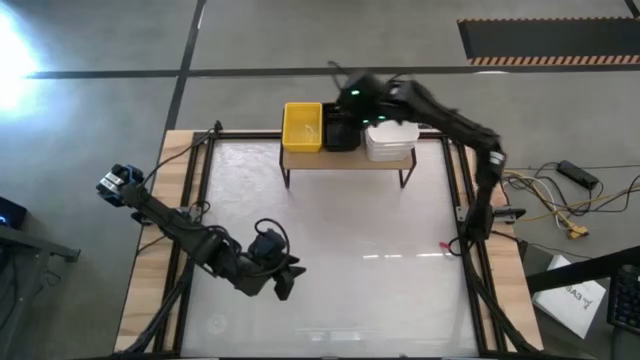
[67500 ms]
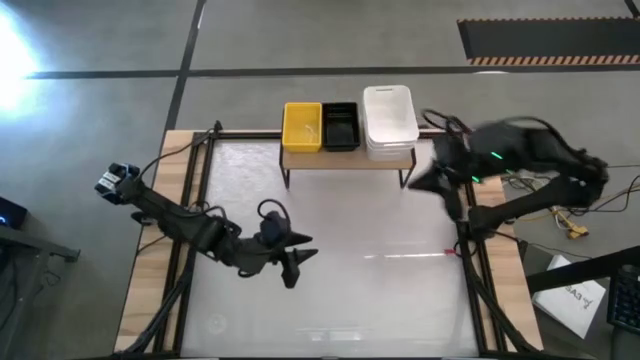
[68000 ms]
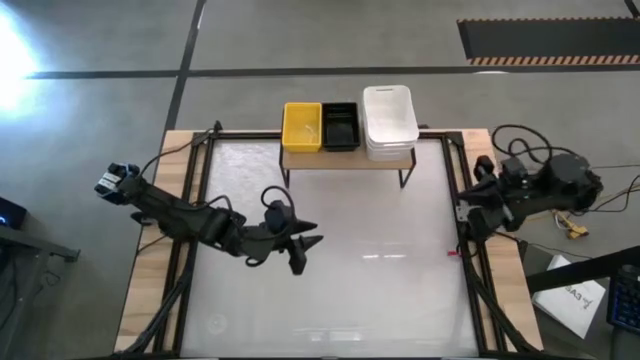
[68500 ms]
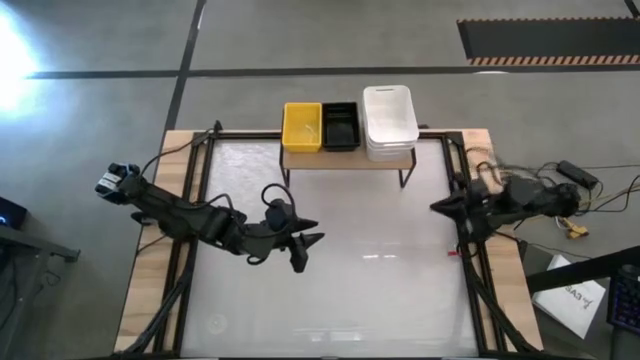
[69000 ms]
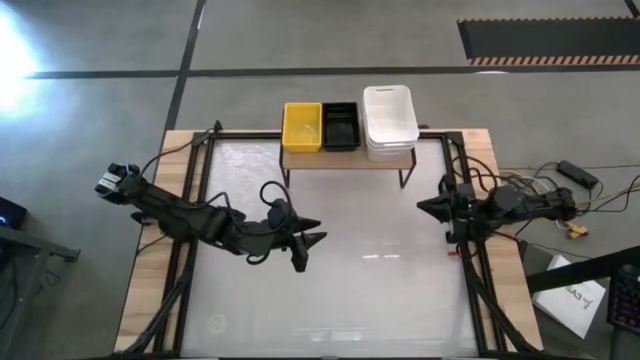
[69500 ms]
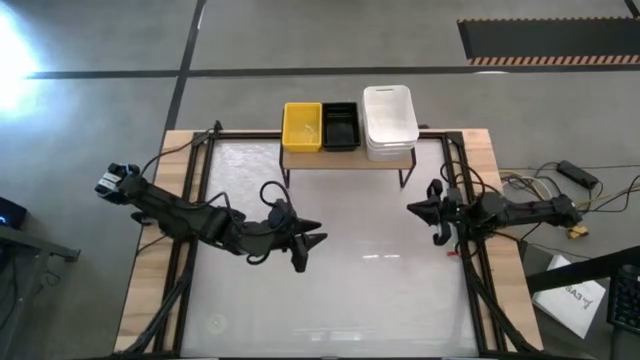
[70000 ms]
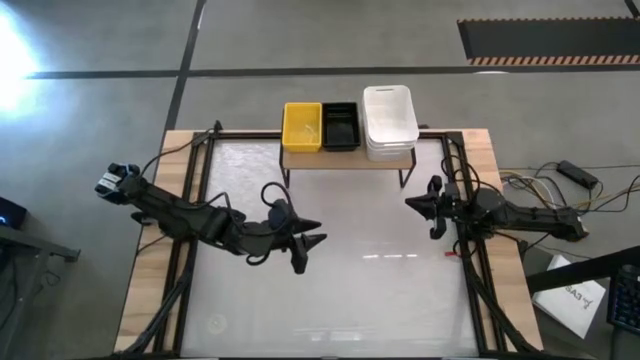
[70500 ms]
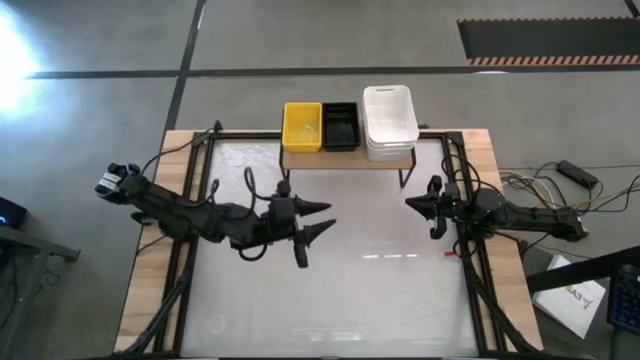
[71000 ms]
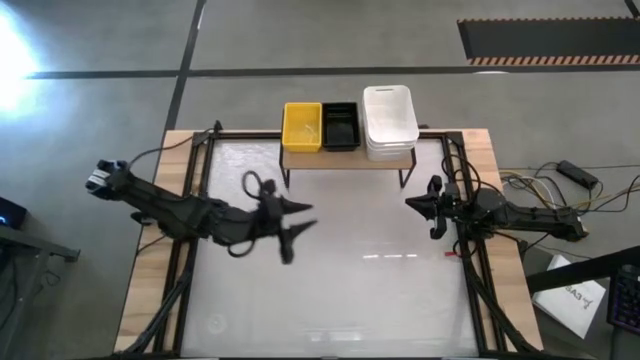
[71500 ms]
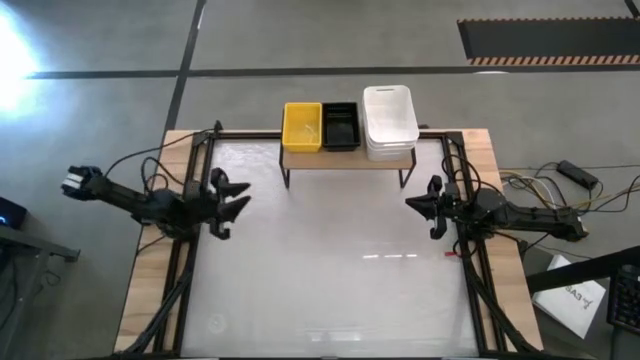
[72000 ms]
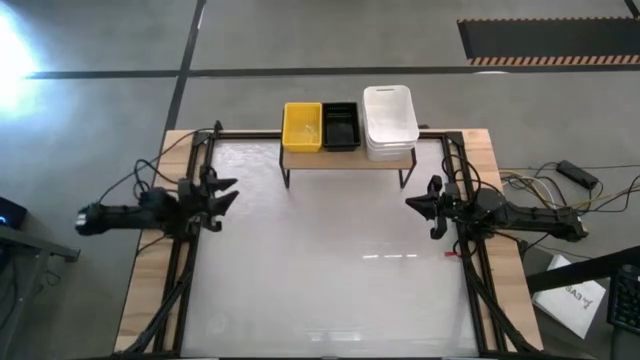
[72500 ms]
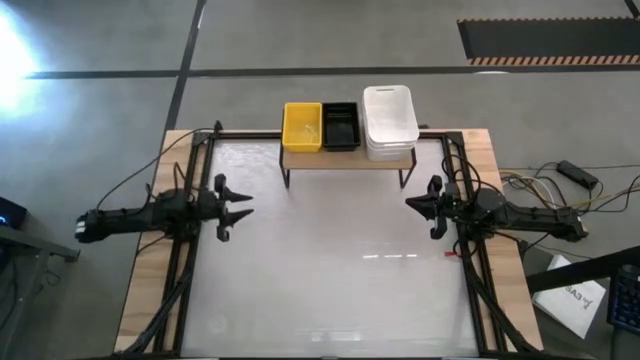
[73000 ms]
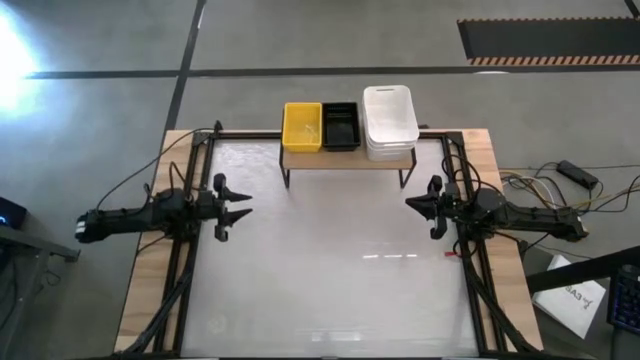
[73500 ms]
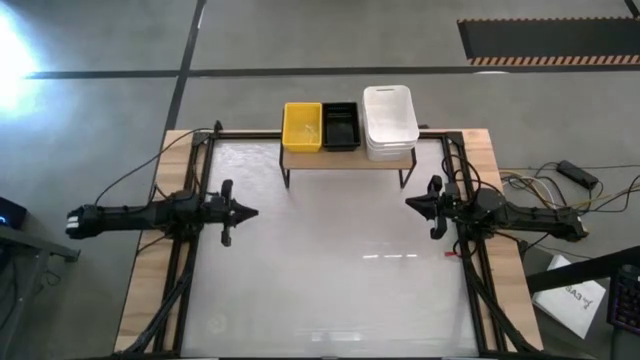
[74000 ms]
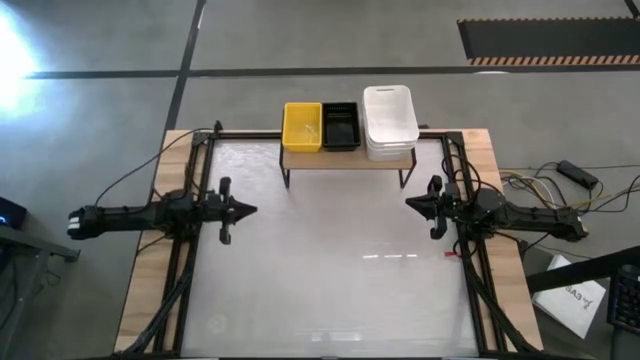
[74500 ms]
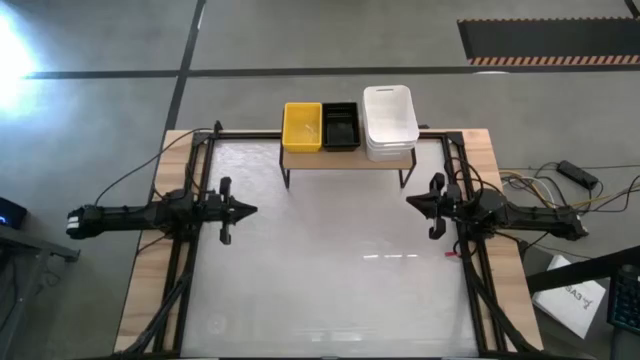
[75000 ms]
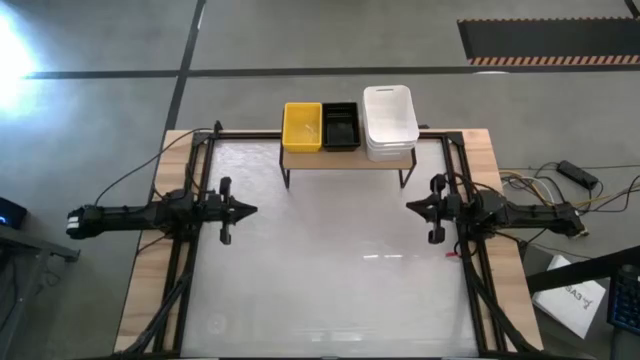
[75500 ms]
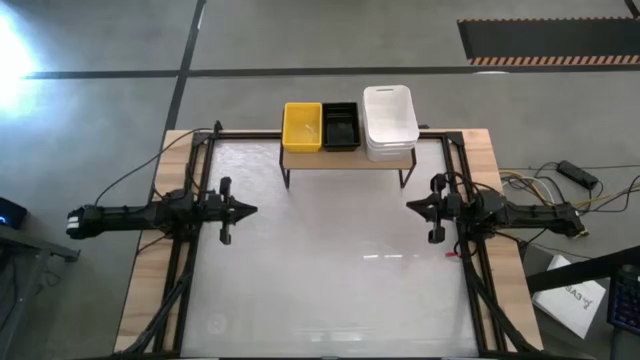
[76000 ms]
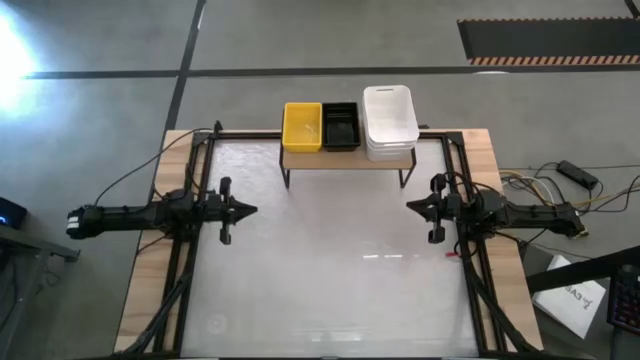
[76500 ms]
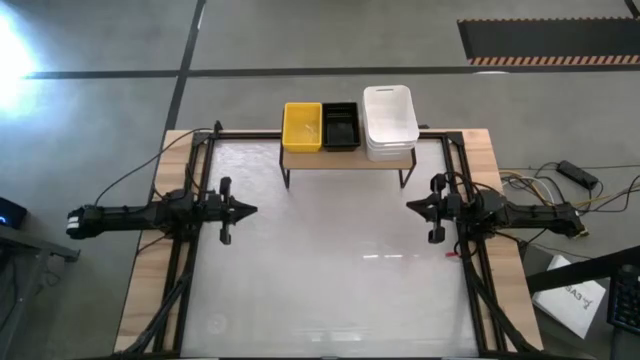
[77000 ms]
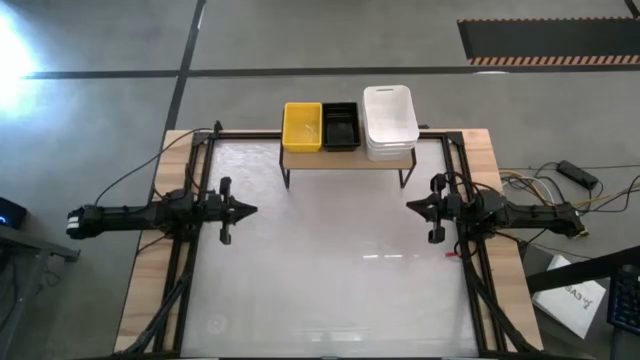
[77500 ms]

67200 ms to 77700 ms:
Task: Stack baskets on shelf by color
Return to Home Position

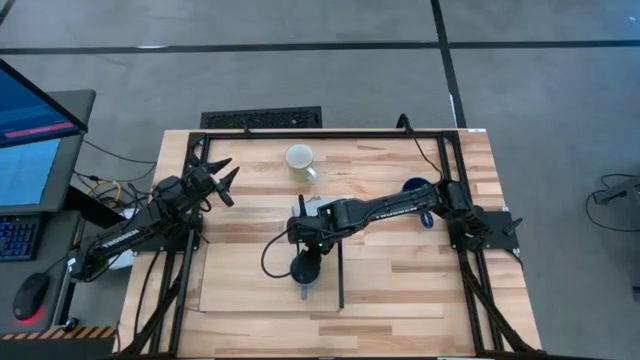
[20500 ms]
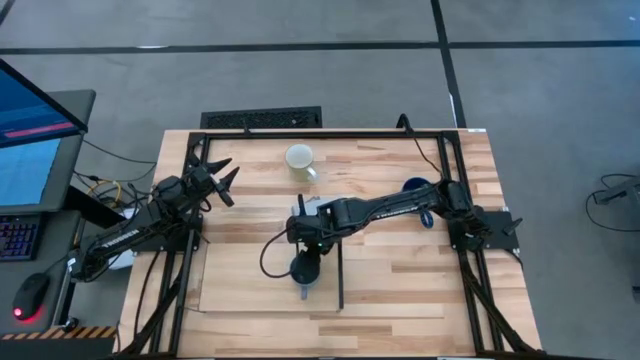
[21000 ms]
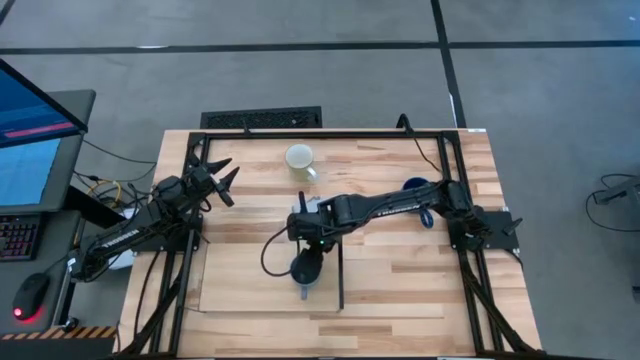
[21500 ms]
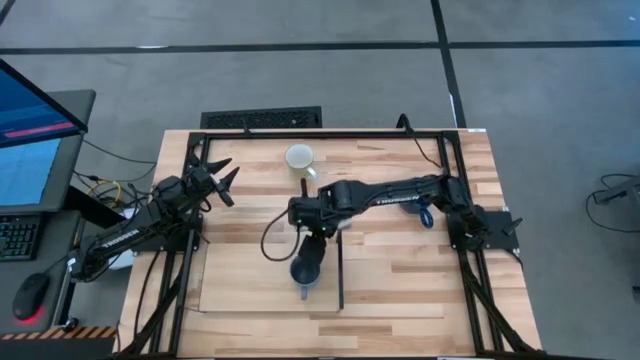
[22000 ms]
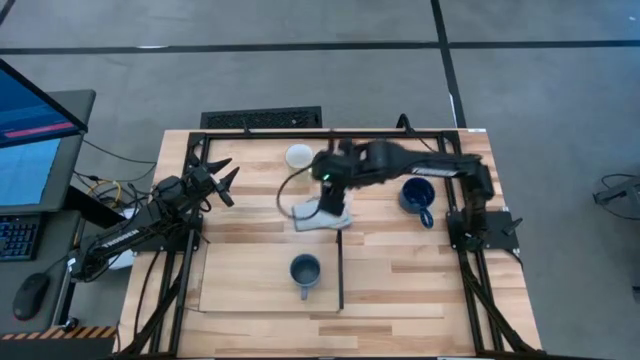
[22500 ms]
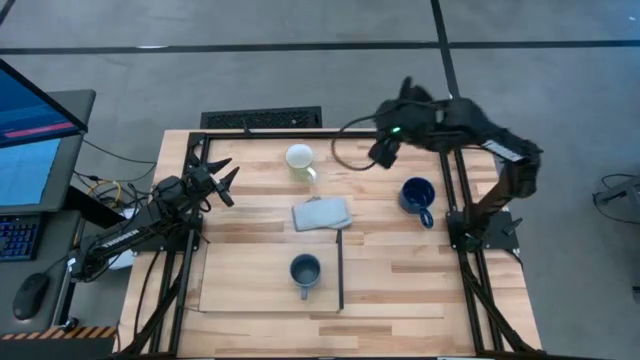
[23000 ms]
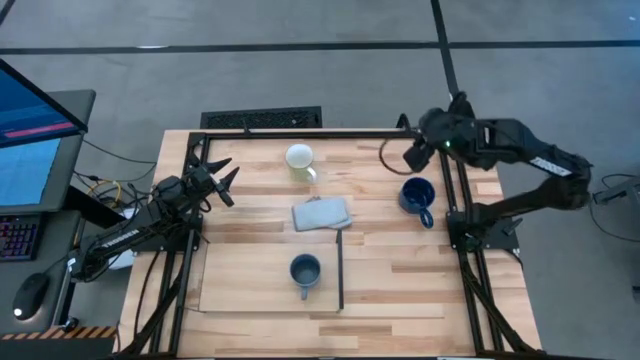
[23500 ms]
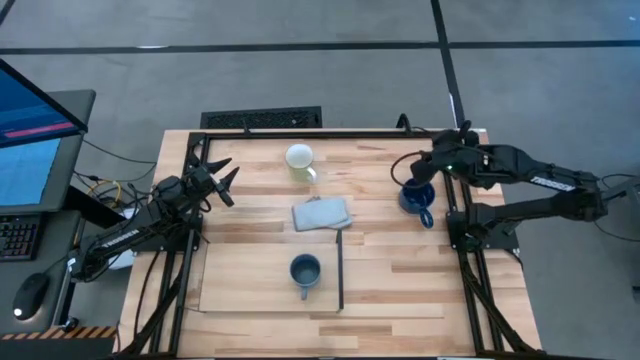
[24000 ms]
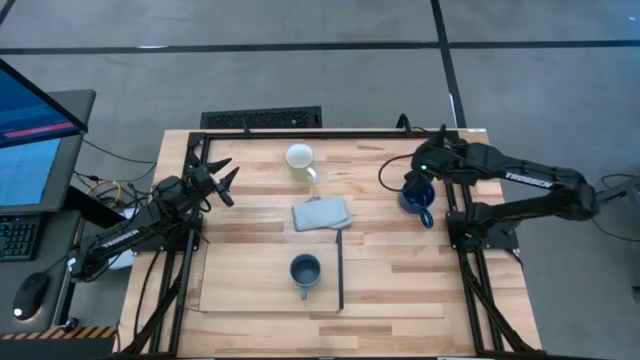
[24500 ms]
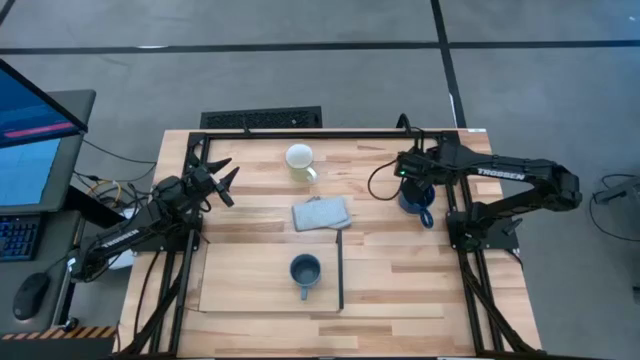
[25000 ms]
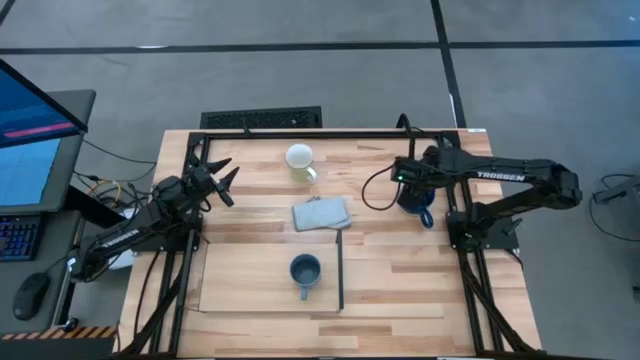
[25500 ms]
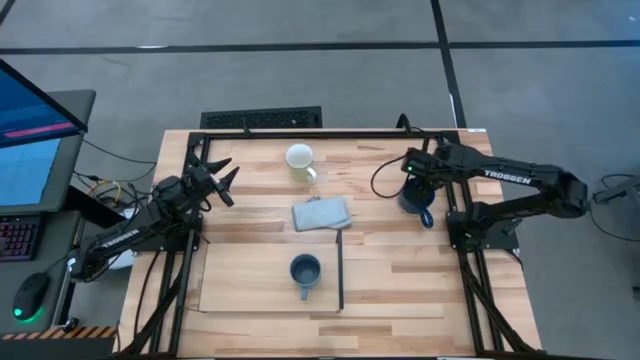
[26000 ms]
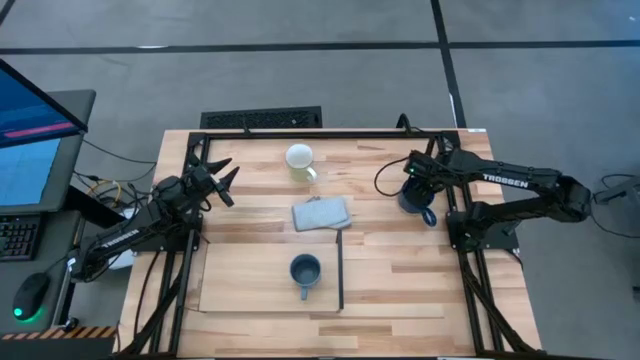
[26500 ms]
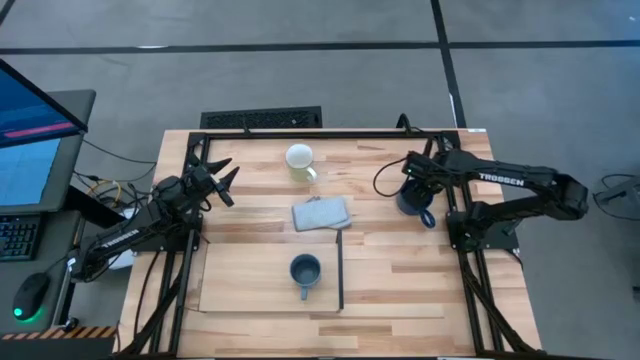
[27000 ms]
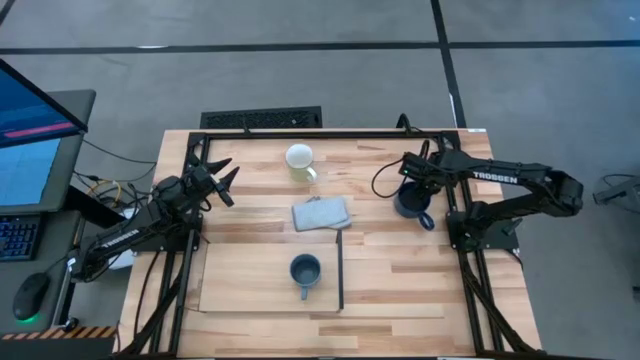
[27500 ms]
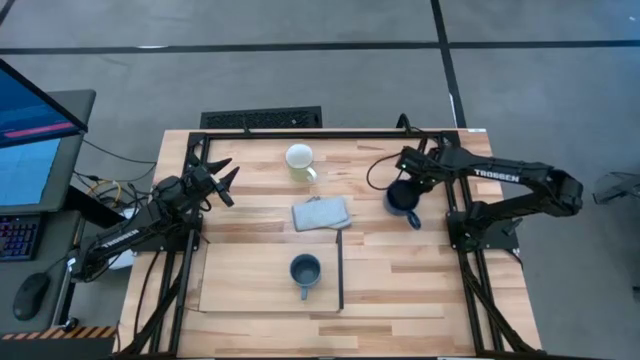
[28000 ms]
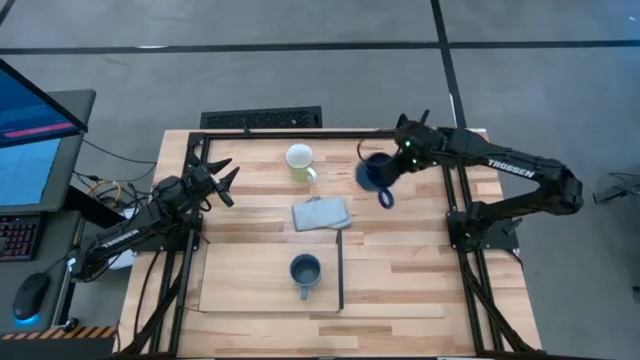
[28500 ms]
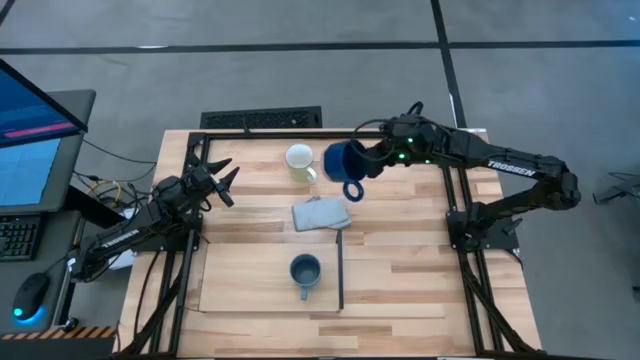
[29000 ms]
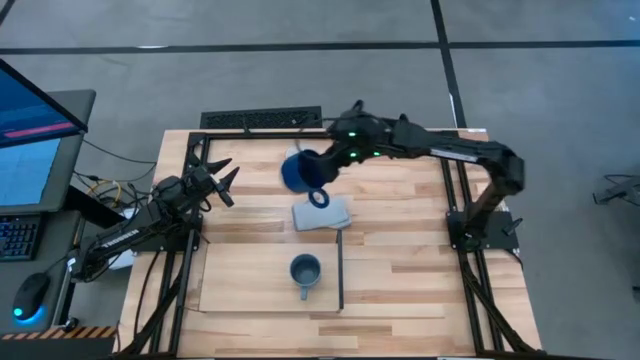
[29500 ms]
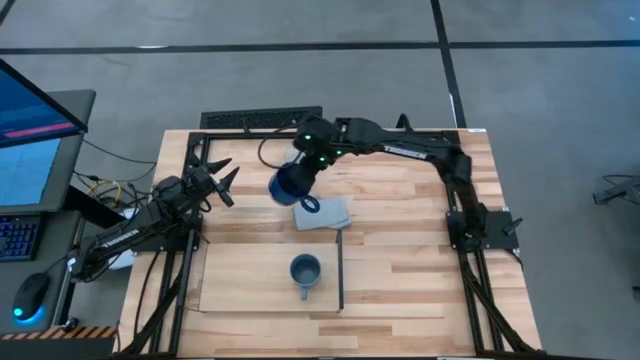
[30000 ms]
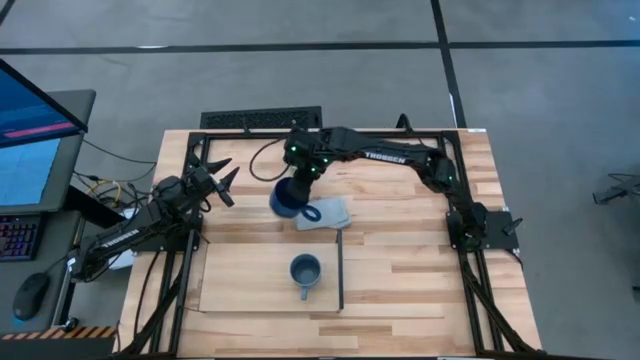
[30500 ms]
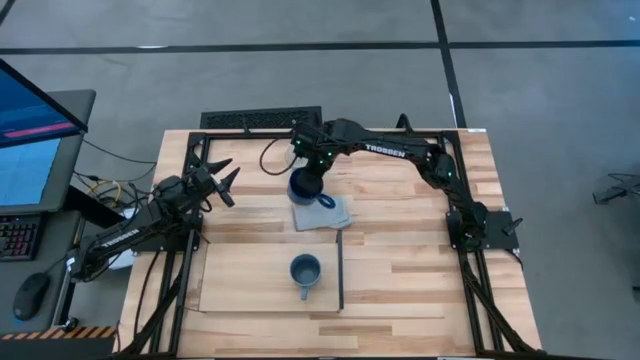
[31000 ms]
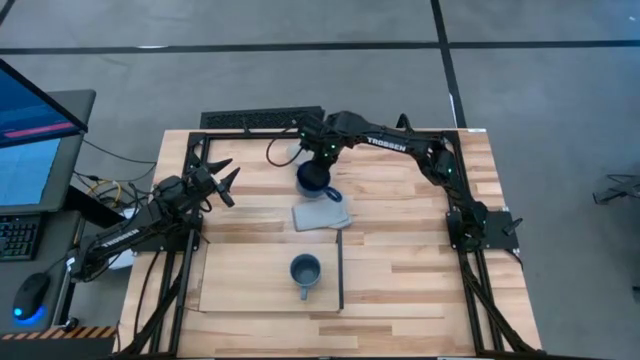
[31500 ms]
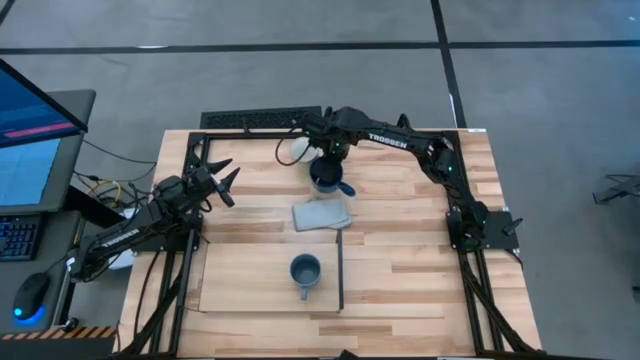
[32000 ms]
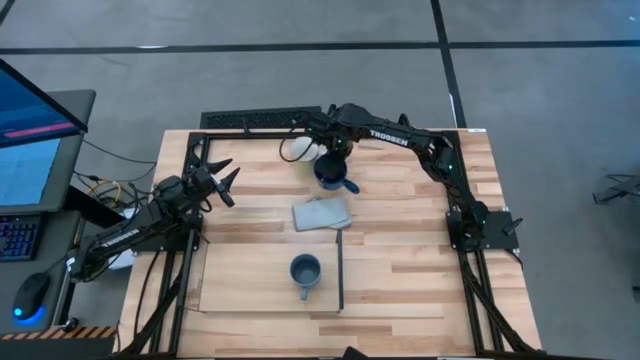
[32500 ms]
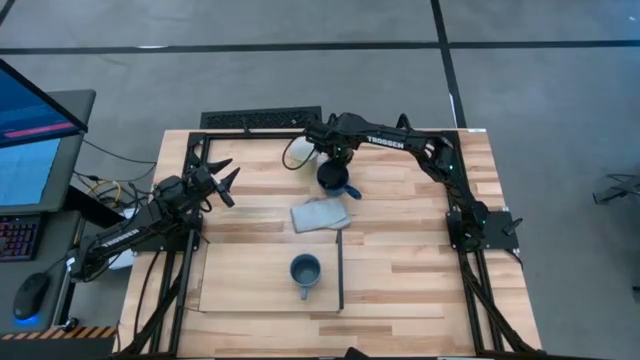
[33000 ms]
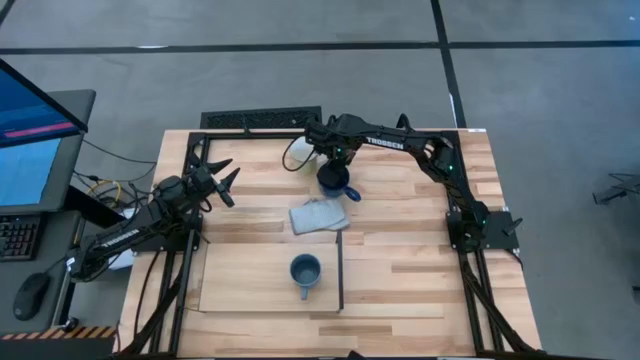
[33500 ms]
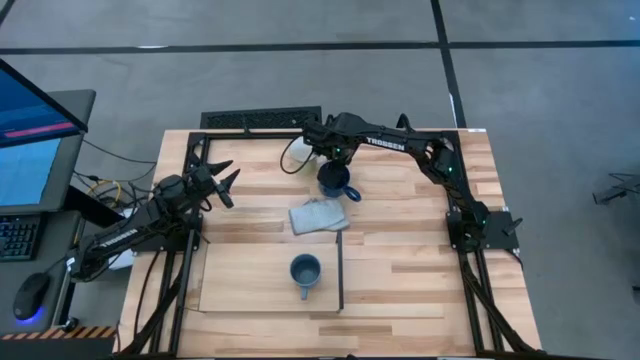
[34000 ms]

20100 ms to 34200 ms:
Task: Stack small to large cups/mugs on shelf
Put the blue mug on the shelf
